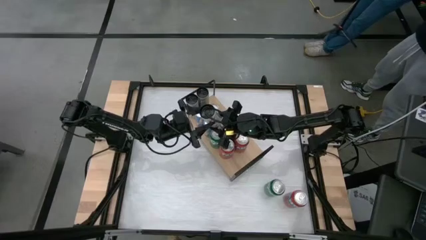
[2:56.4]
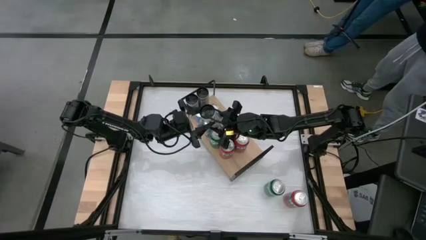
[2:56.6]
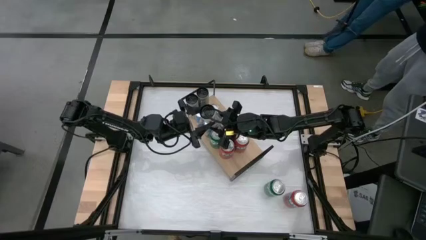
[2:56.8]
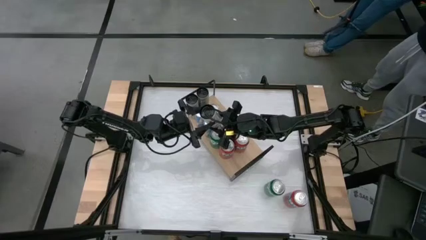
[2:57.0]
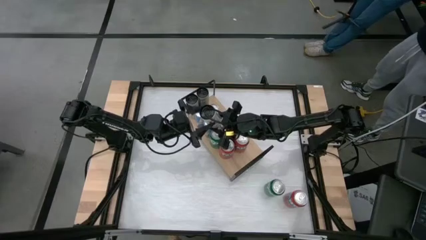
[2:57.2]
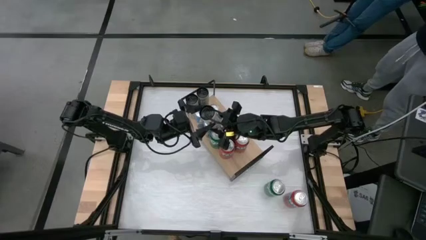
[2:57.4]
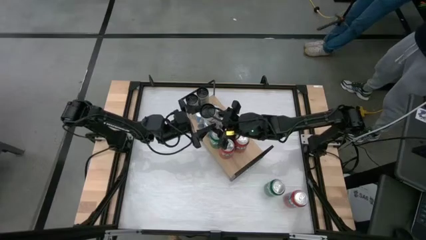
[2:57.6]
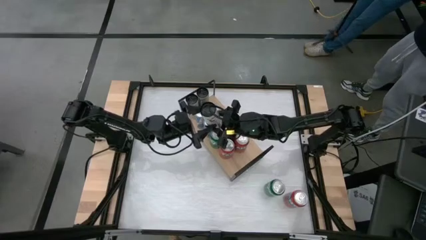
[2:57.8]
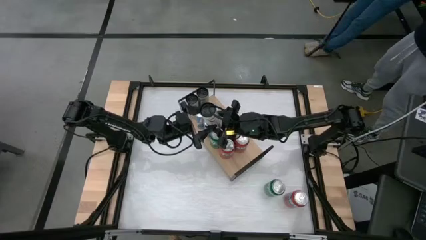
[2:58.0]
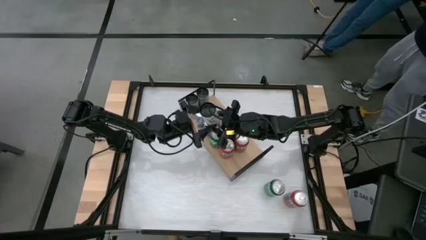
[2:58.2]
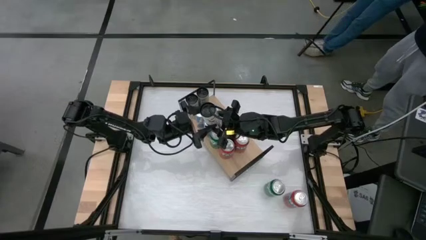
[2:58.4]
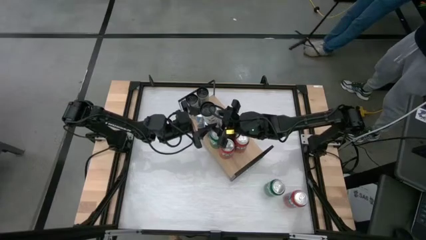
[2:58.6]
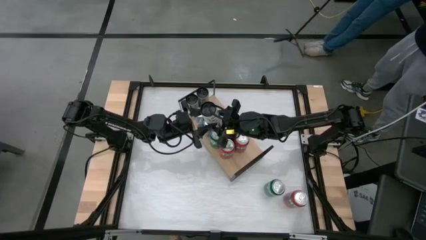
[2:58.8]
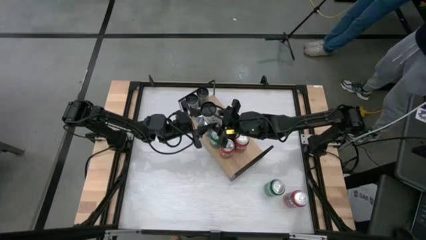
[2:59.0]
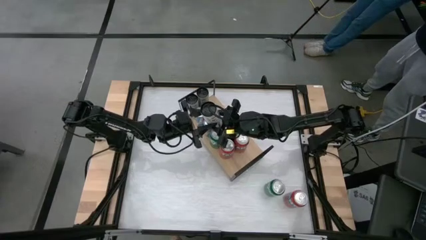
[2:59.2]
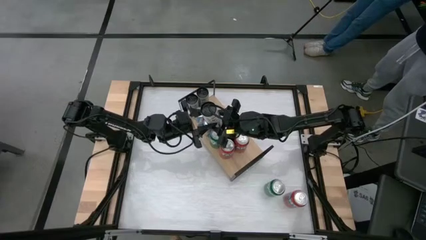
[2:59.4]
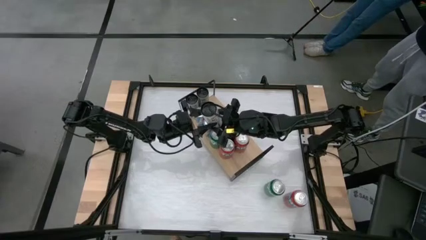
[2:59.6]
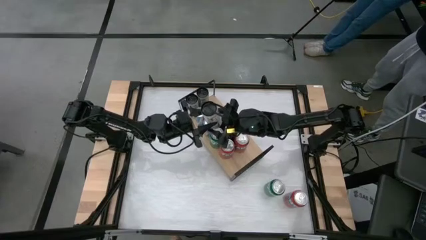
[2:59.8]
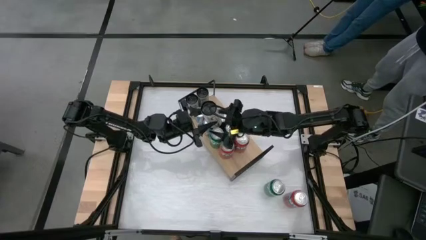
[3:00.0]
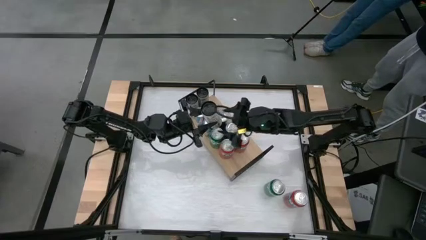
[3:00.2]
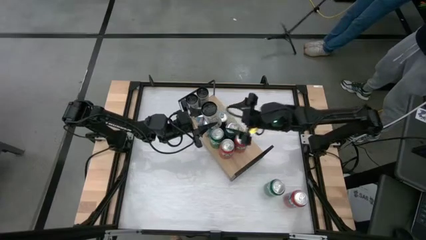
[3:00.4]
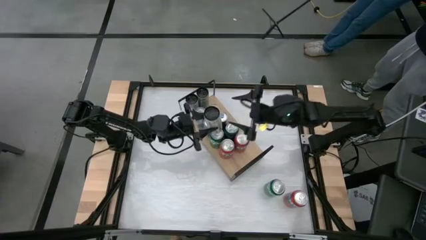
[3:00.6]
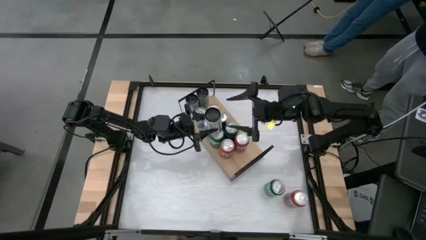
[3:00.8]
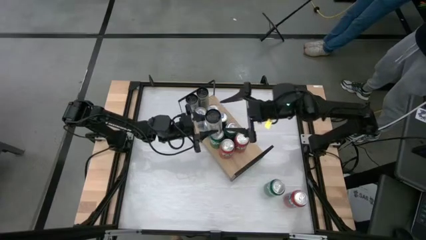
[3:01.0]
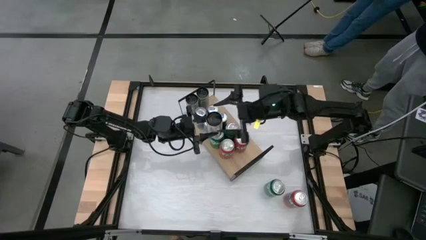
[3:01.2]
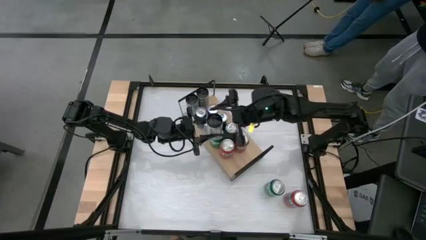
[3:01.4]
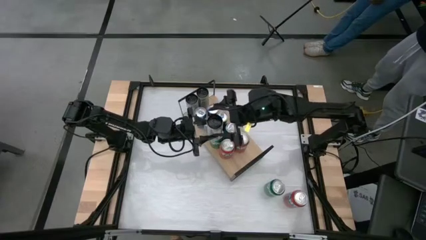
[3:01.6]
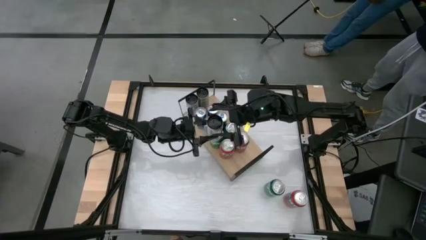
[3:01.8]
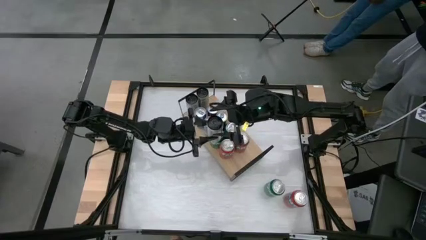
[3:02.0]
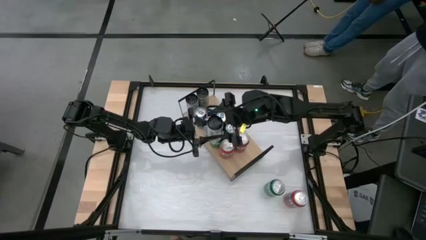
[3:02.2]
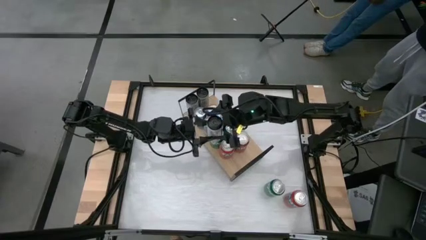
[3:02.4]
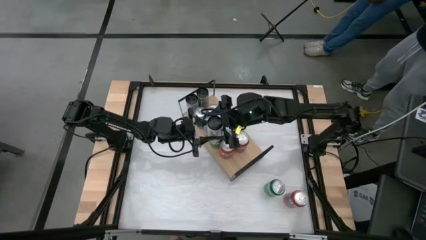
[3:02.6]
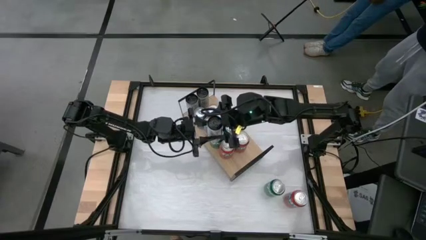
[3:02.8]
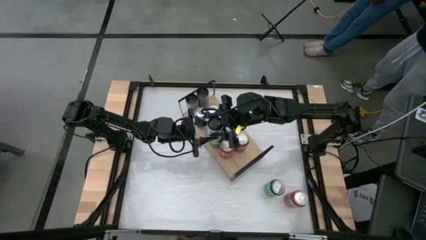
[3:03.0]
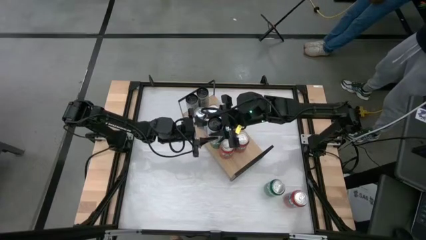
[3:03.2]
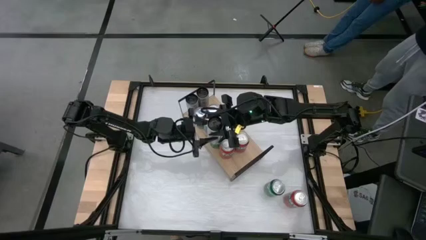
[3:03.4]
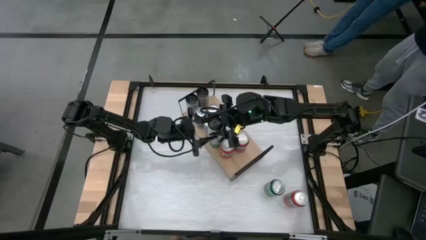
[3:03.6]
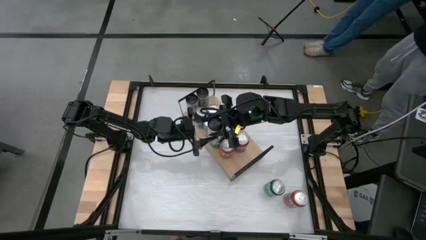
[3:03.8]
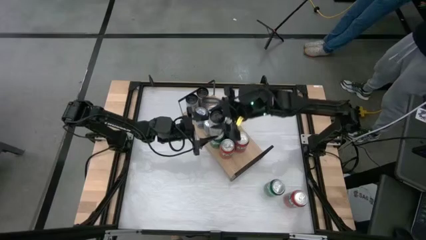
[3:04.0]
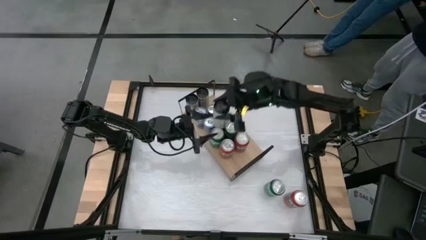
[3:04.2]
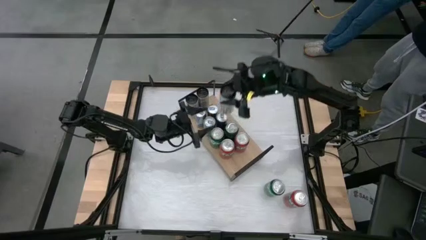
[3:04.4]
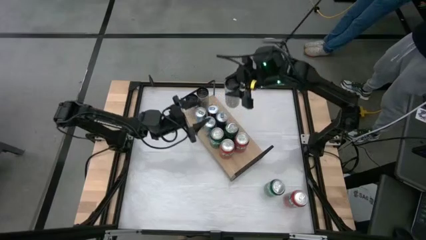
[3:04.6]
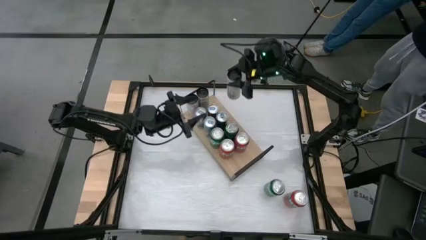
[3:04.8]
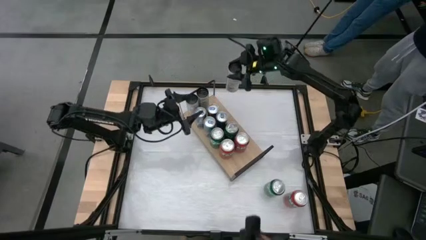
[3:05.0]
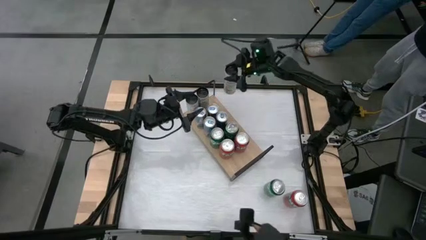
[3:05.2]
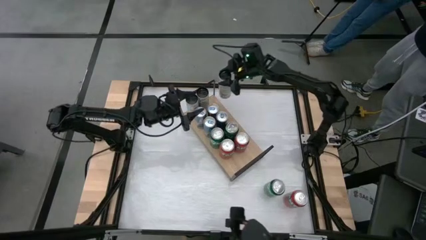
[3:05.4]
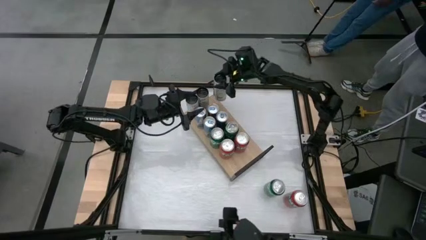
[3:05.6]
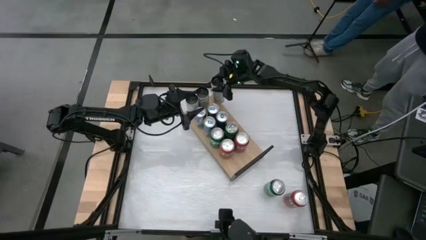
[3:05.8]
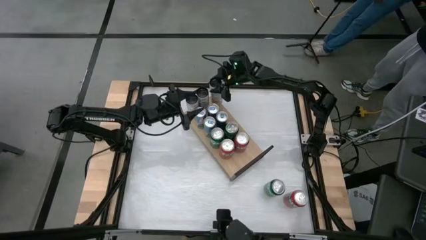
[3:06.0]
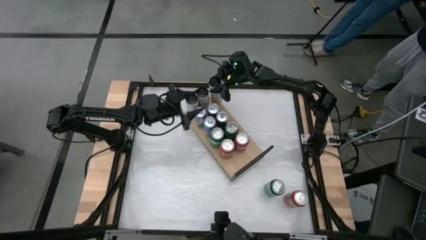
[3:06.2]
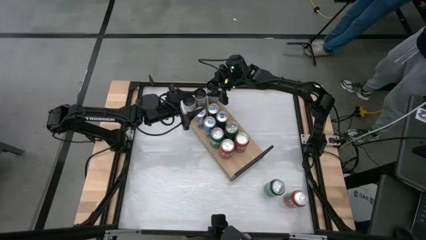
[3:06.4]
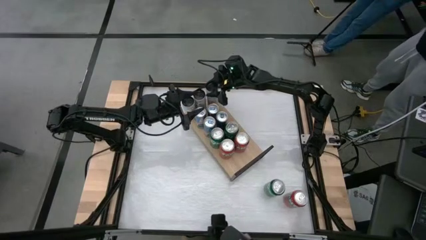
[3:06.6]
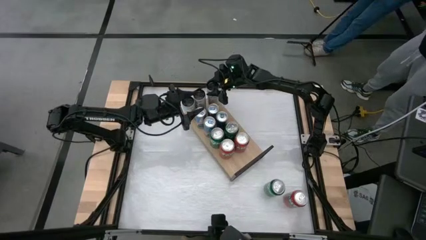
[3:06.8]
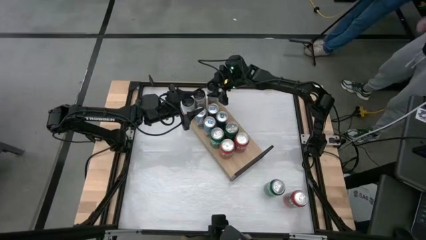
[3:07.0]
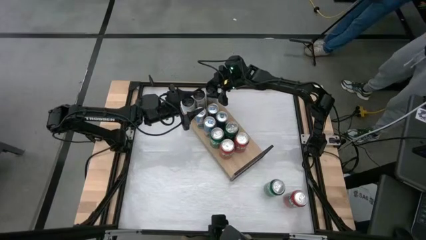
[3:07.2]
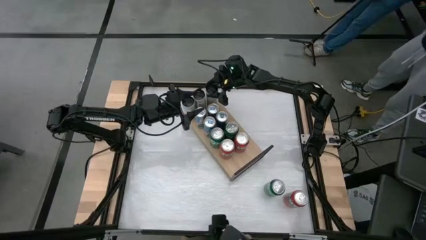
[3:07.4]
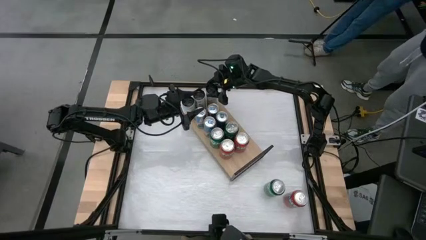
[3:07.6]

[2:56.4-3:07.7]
Task: Place canned beverage on shelf
Put the white yellow soda can on the shelf aligned with the other white yellow soda cans

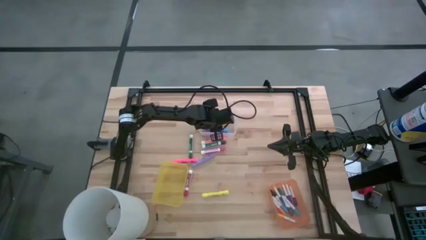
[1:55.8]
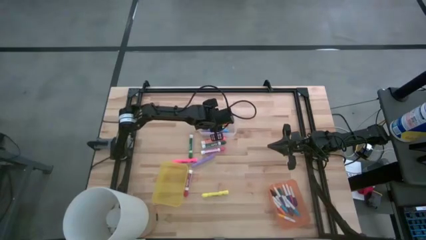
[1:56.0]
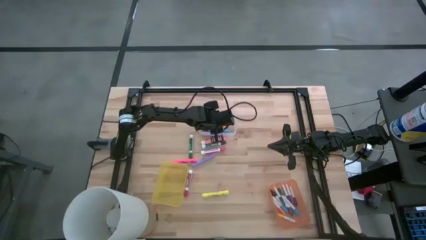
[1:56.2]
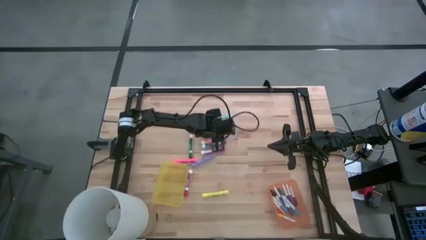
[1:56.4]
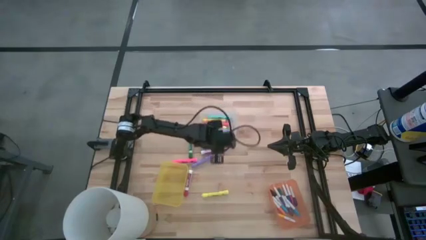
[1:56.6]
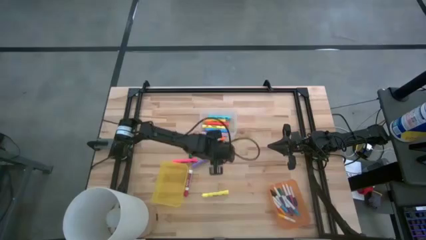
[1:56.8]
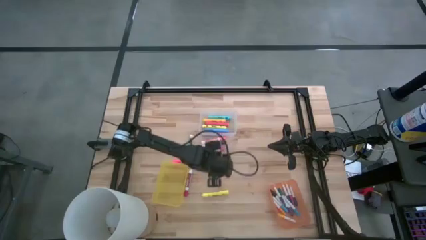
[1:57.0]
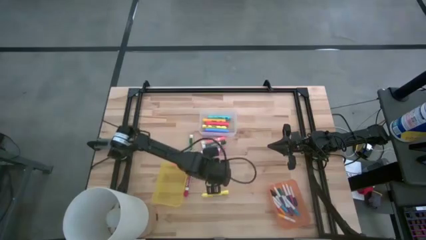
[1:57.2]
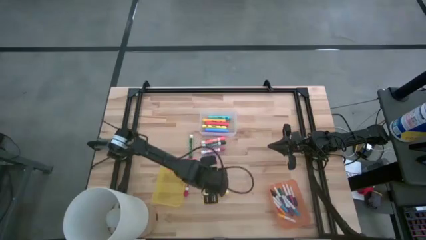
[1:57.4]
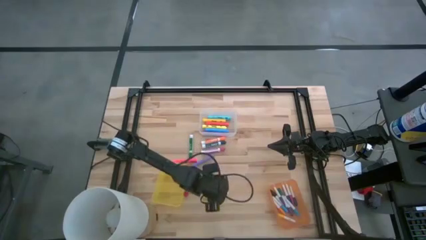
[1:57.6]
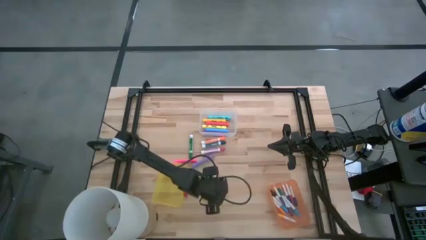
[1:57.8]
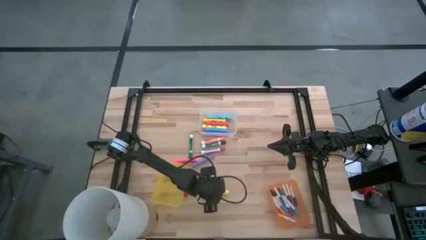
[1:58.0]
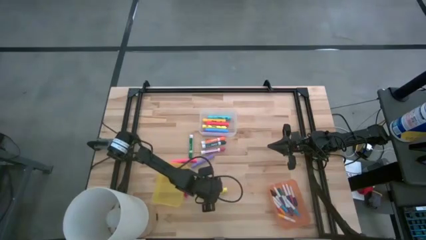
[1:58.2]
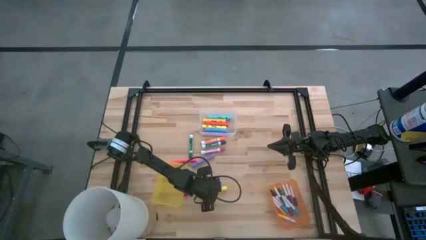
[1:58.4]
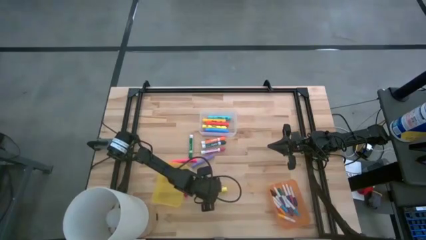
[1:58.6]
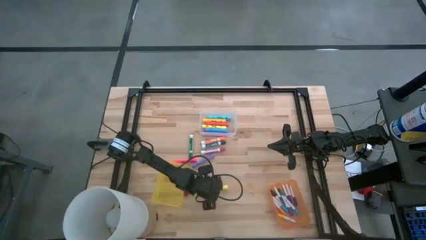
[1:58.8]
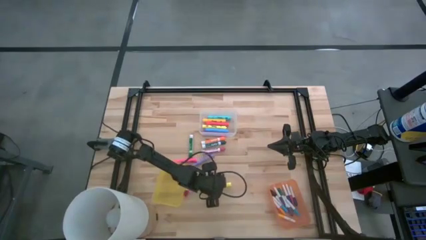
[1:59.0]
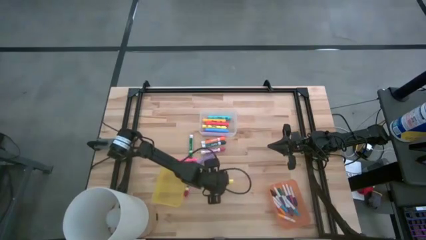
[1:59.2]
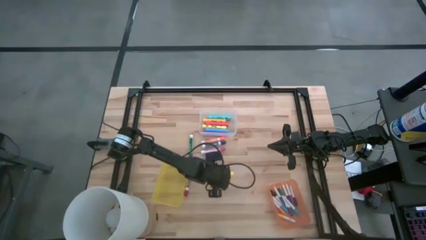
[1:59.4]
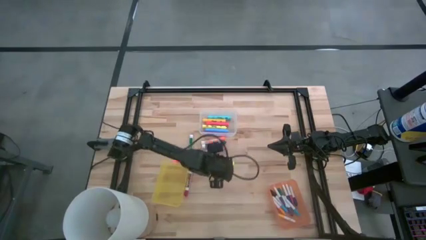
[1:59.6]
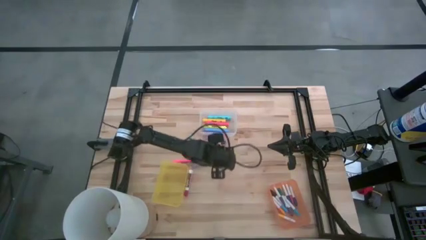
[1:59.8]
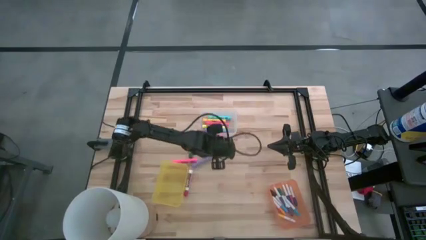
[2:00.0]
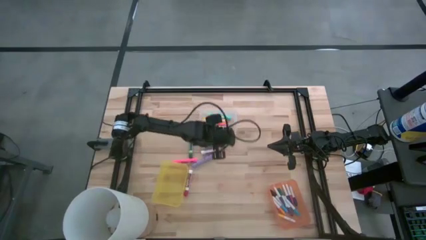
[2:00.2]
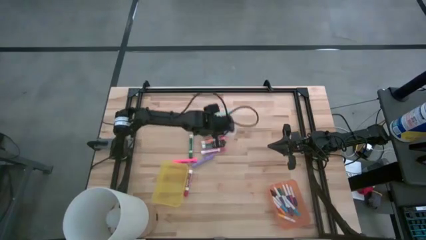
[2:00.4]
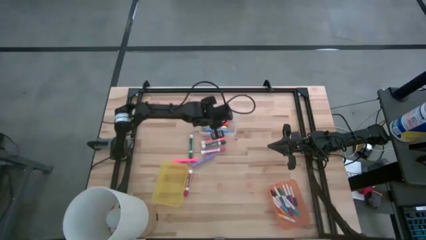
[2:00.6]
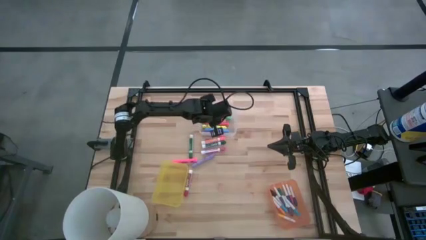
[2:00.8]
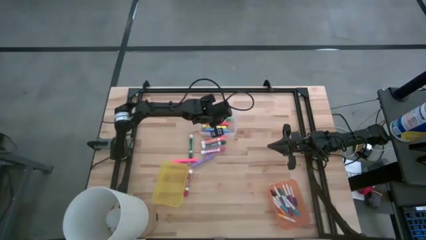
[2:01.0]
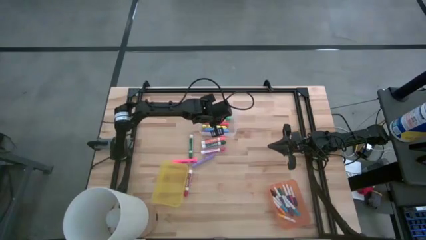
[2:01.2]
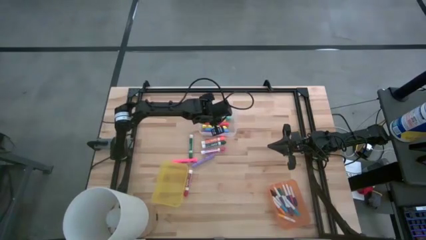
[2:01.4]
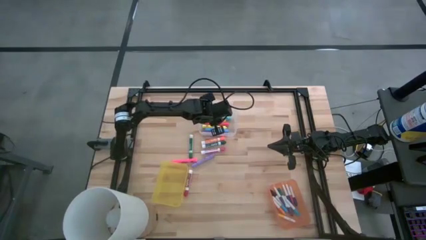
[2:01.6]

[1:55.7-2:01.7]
Task: Pick & Place Markers
Put the large yellow highlighter pen into the transparent bin
